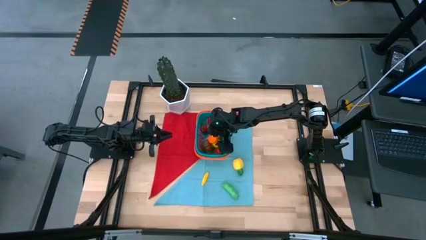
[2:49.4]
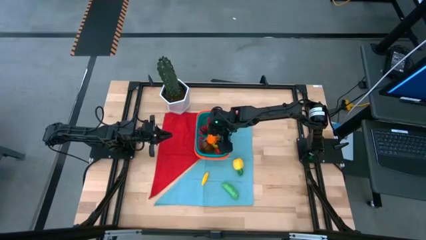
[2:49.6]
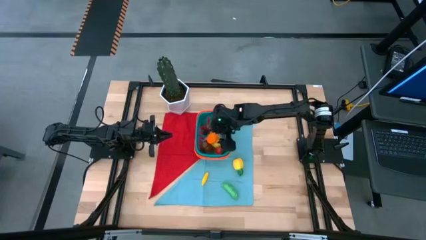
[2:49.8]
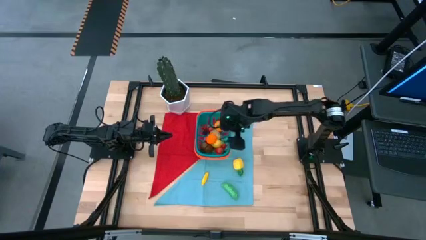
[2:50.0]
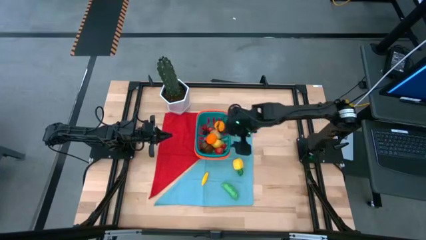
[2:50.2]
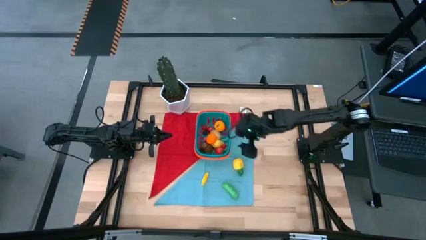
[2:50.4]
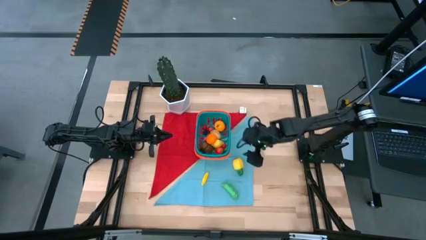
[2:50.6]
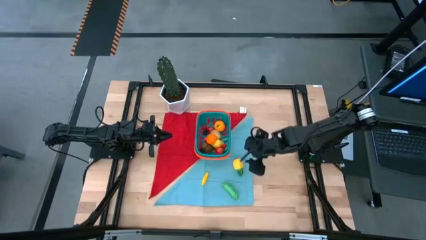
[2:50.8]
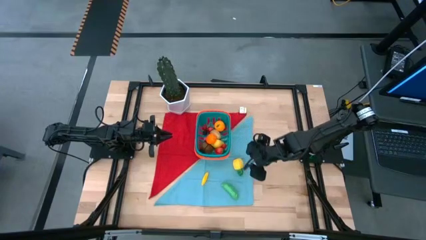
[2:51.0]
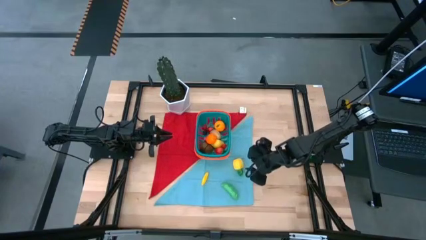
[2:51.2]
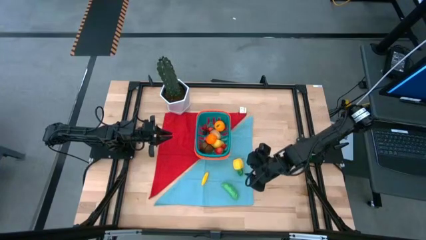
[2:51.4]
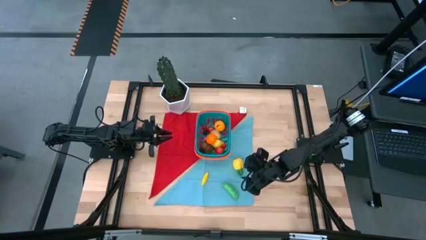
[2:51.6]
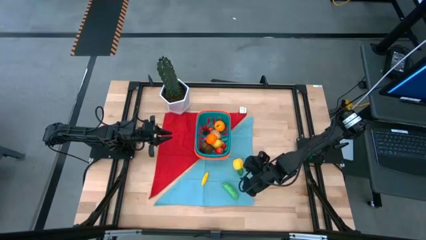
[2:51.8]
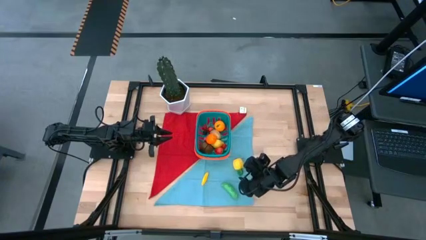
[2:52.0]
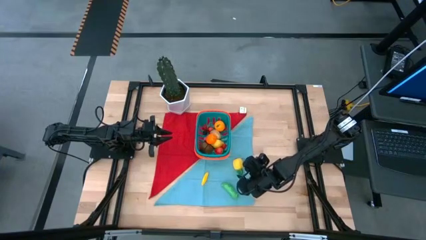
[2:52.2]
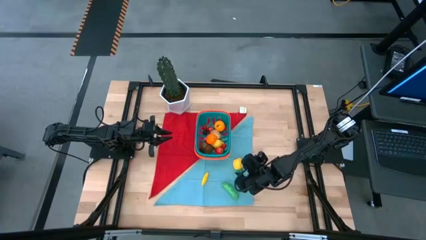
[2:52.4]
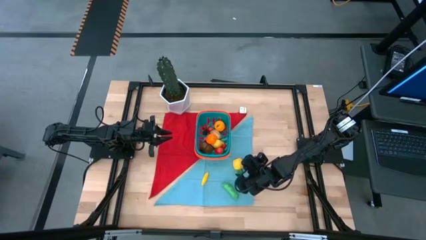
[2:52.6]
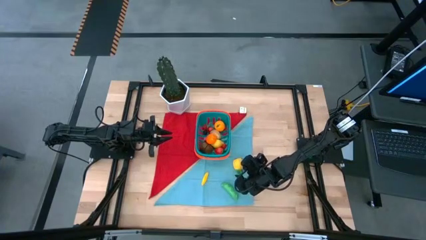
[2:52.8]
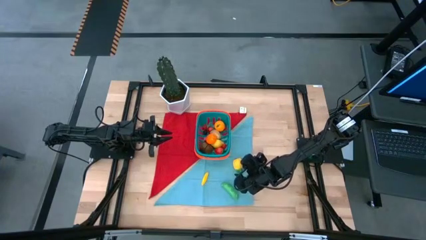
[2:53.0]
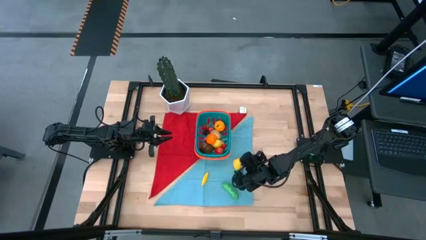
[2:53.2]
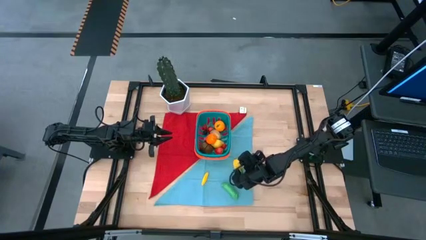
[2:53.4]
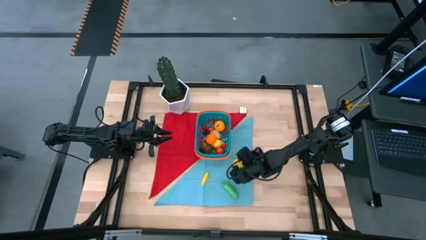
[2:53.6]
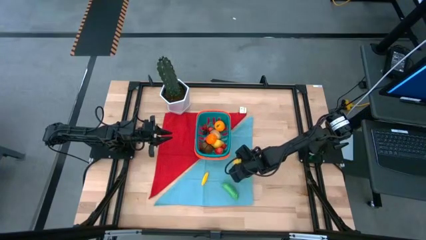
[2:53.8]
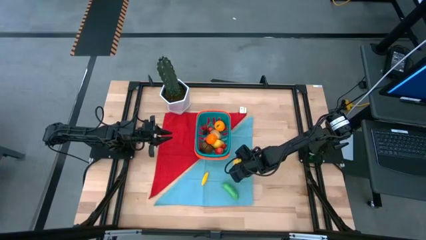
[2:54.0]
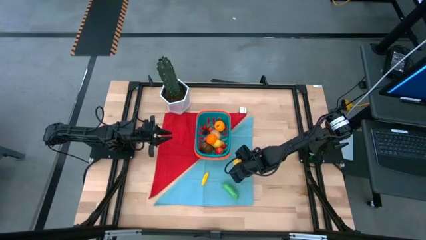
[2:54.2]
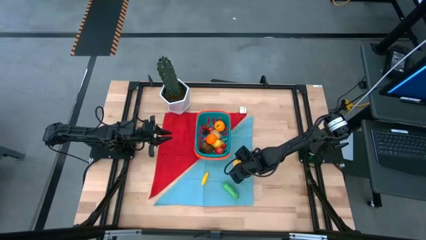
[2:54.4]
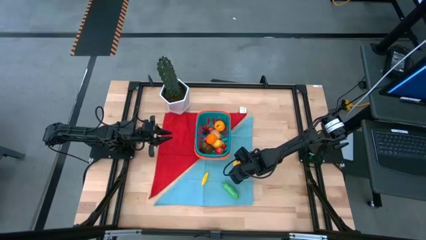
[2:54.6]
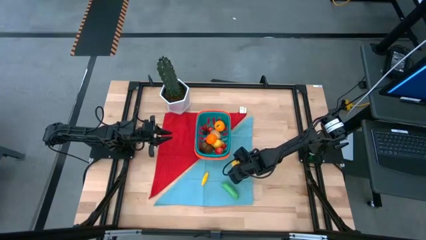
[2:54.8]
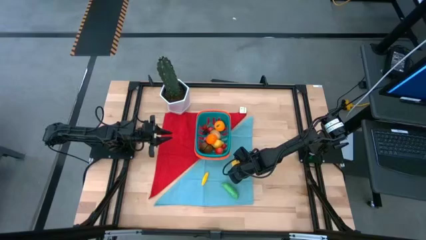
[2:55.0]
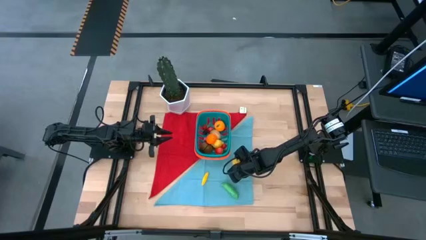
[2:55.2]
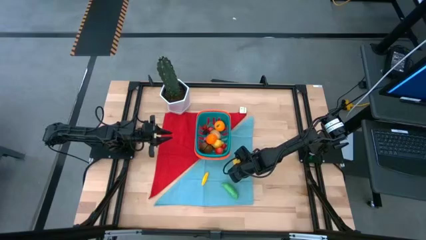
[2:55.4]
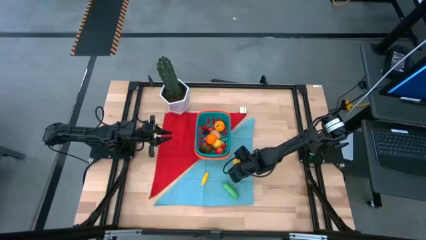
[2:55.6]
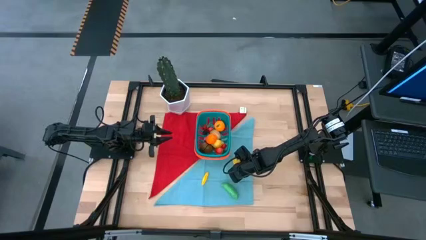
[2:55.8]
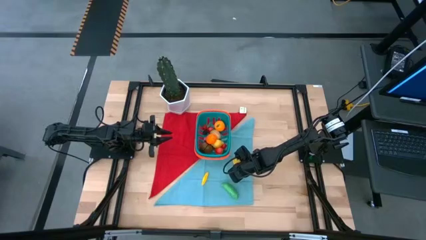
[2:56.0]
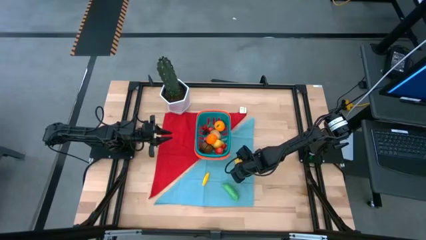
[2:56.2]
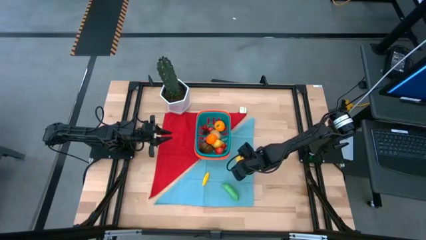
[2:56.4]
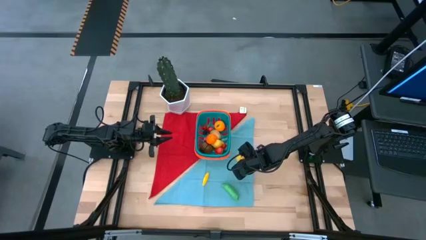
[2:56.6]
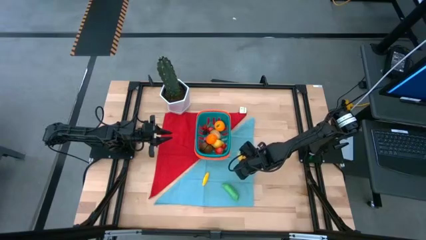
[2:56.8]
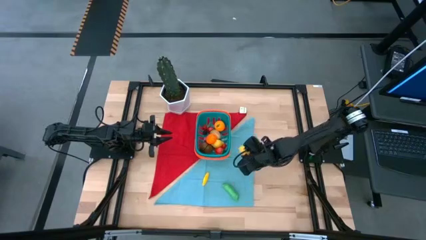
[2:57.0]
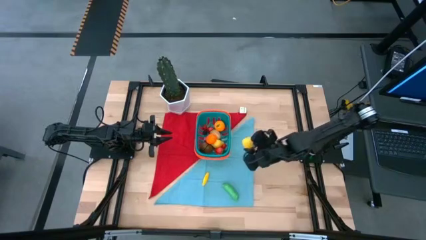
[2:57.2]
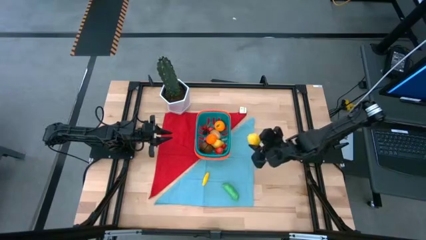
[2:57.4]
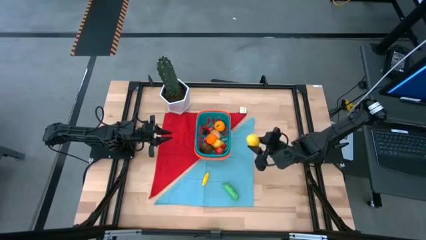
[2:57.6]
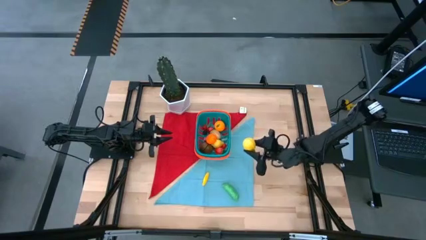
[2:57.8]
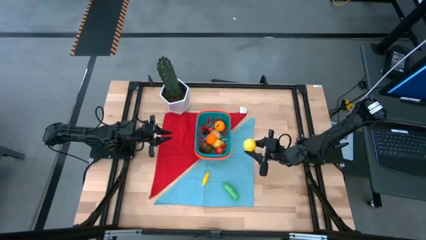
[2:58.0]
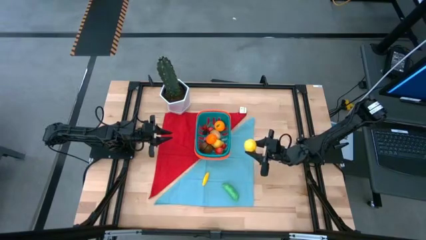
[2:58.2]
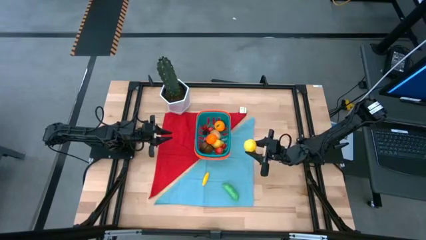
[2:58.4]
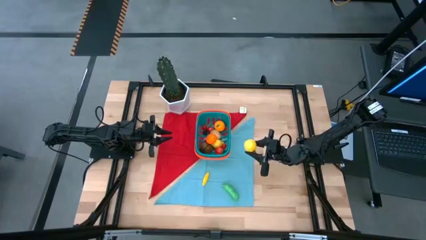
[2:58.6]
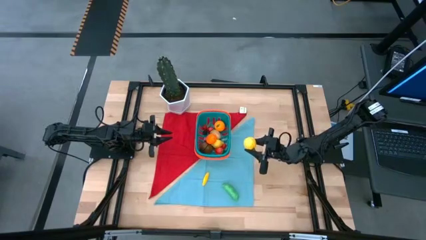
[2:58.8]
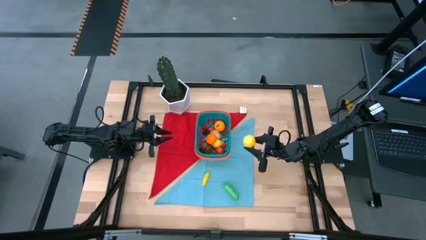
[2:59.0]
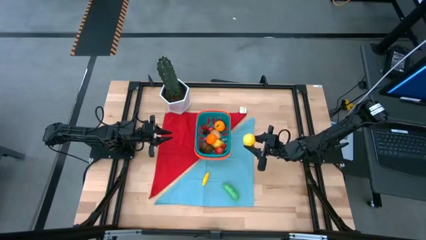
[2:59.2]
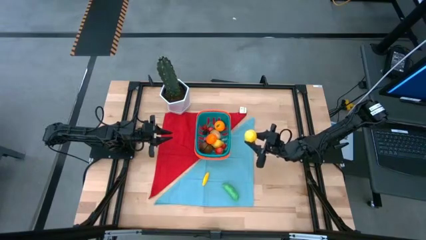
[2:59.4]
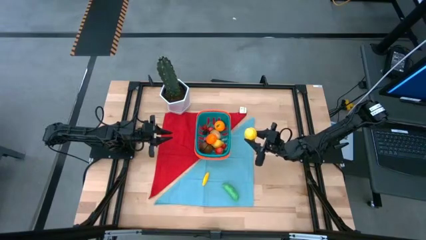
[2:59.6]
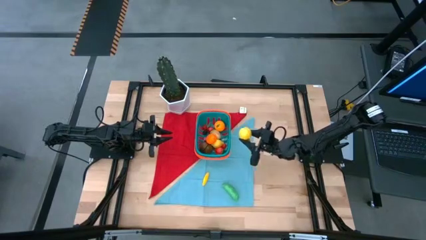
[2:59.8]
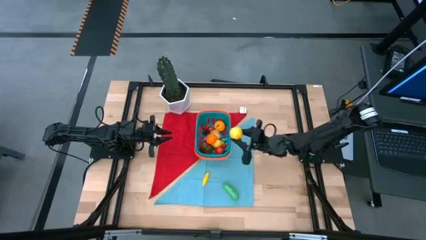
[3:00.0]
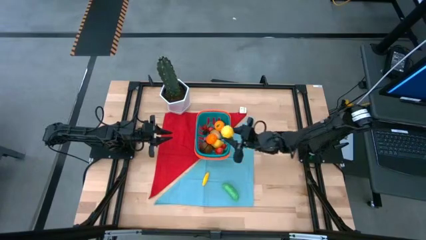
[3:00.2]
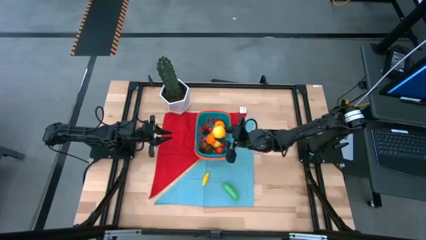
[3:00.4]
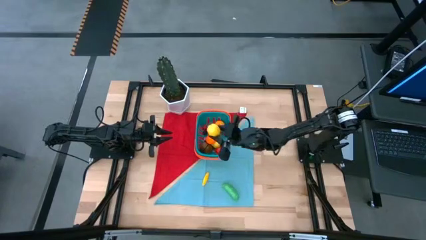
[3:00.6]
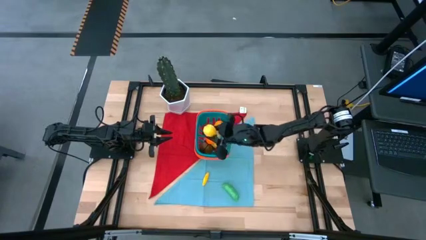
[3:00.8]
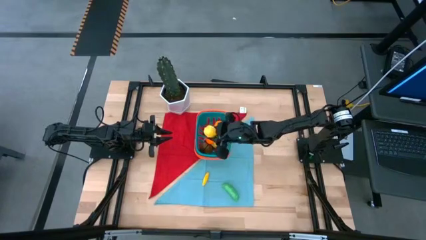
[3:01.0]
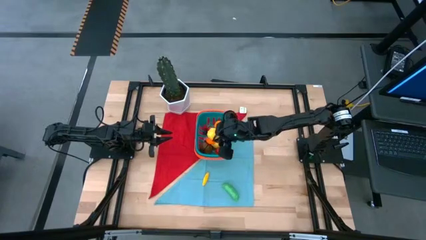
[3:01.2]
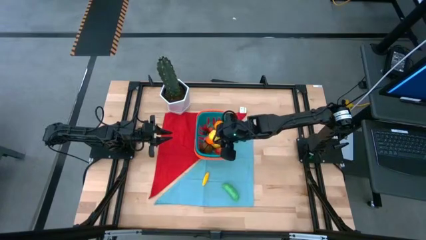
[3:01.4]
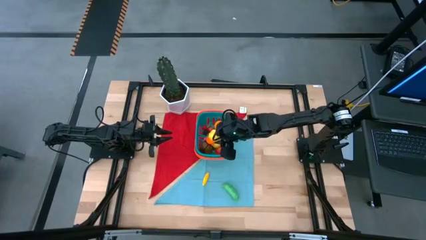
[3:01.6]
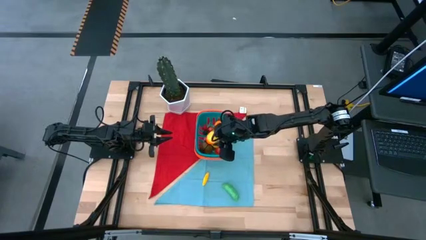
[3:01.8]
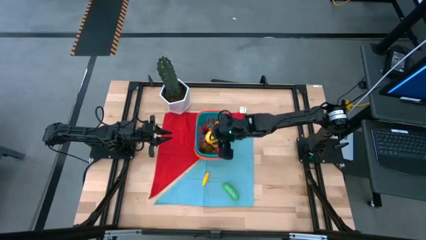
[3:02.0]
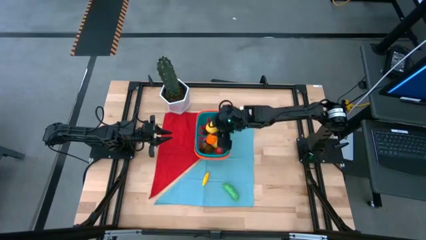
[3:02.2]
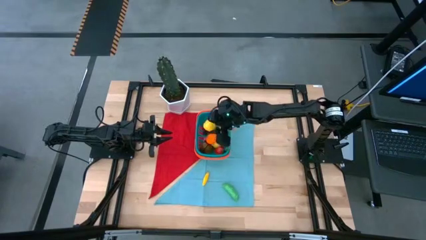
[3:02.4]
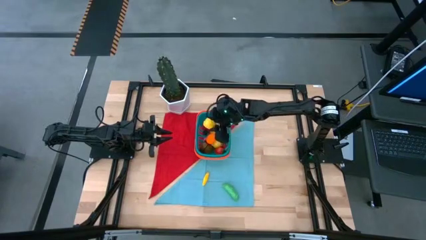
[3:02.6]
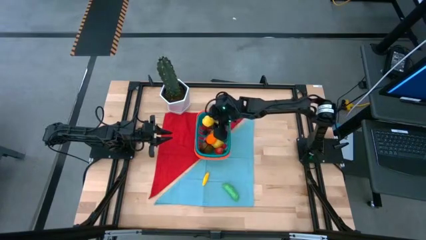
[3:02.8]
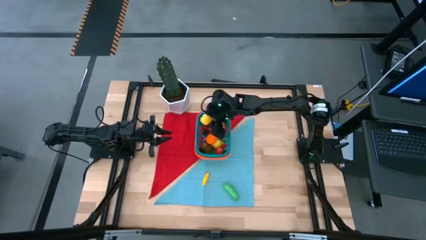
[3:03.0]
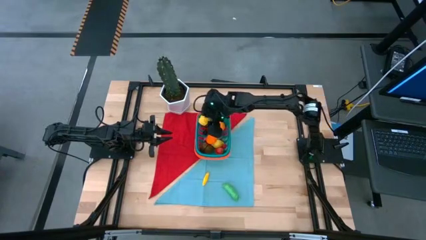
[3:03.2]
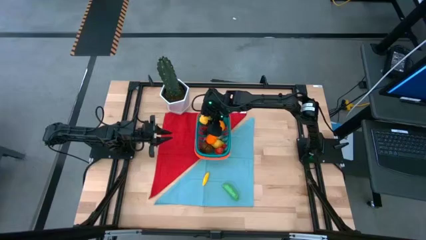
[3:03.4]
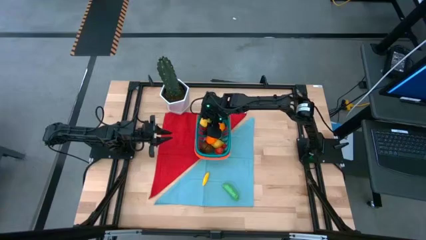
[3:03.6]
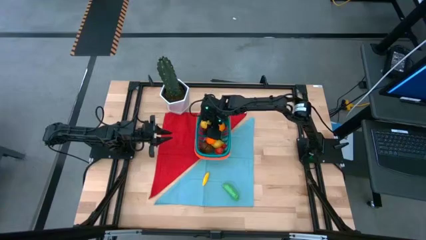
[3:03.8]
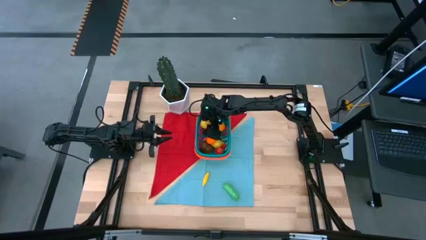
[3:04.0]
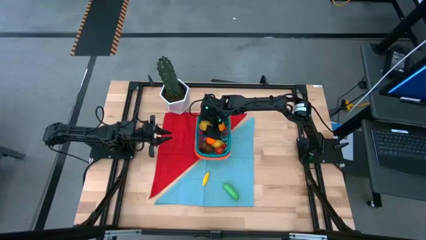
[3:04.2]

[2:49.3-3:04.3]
Task: Pick and placing Produce into tupperware
Put the pineapple into the basket

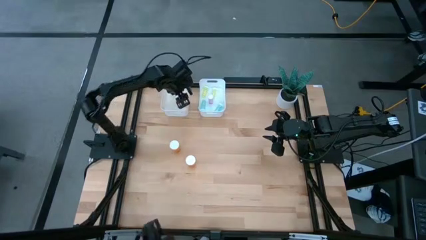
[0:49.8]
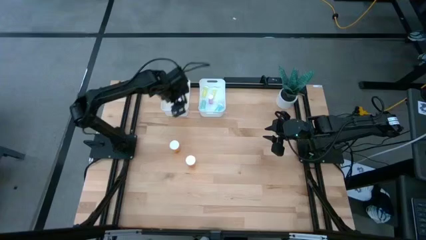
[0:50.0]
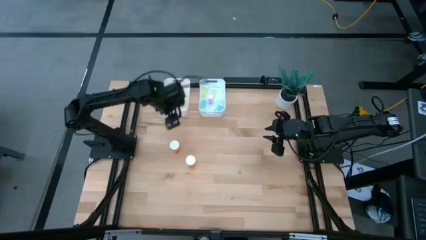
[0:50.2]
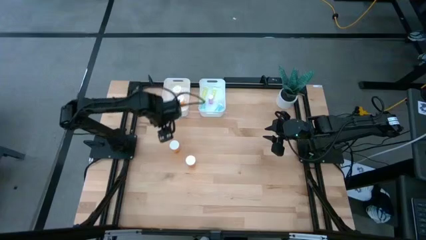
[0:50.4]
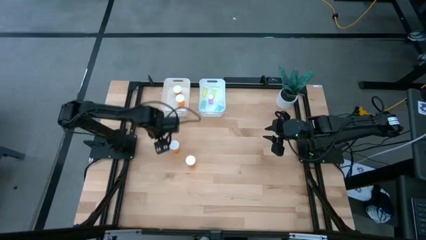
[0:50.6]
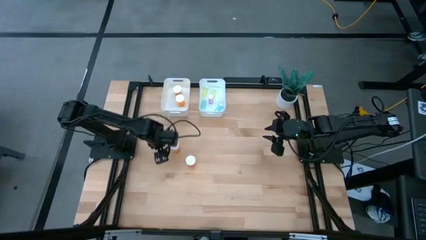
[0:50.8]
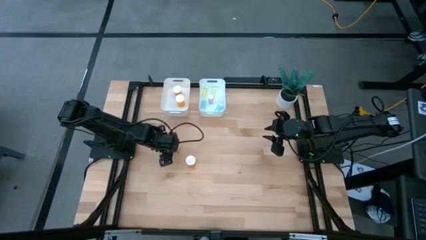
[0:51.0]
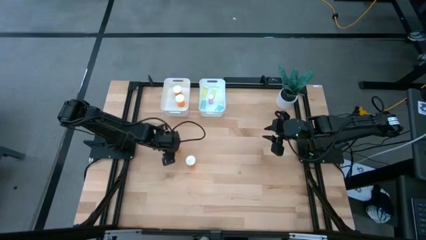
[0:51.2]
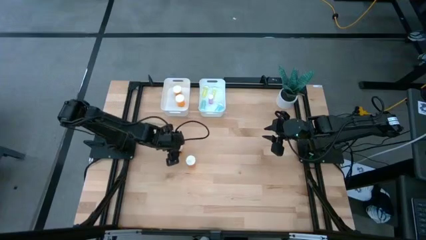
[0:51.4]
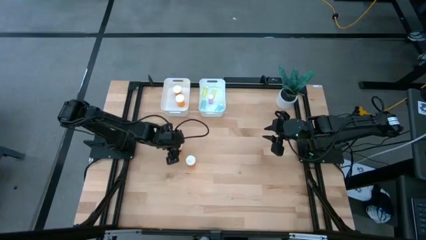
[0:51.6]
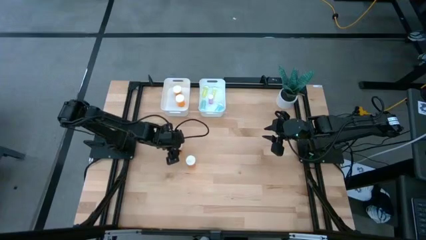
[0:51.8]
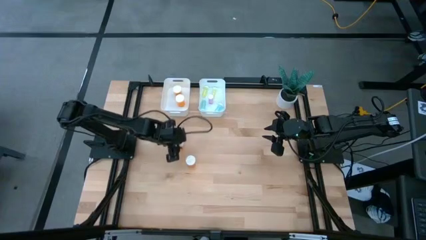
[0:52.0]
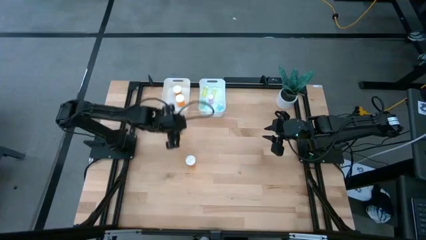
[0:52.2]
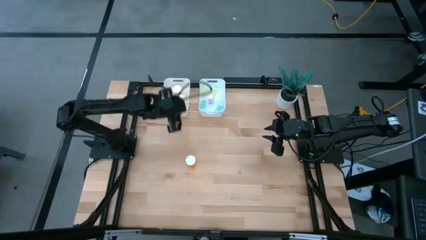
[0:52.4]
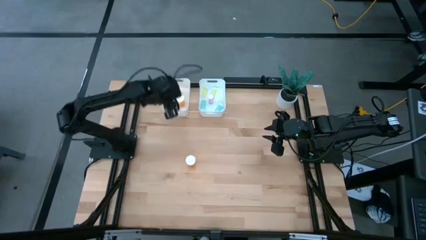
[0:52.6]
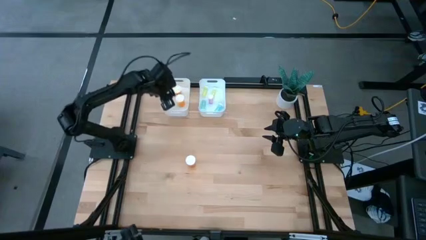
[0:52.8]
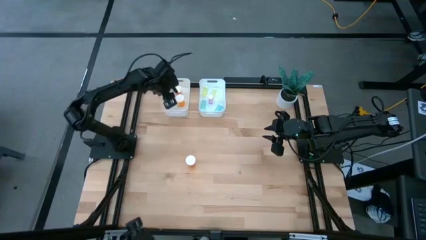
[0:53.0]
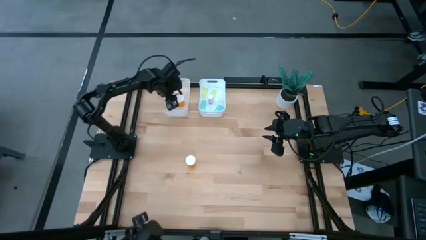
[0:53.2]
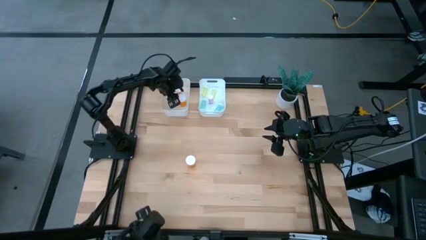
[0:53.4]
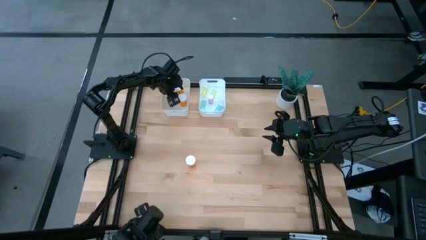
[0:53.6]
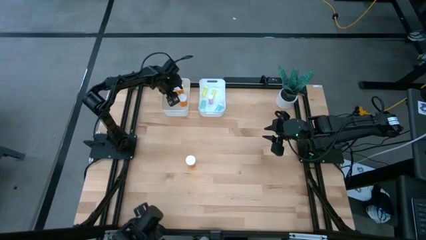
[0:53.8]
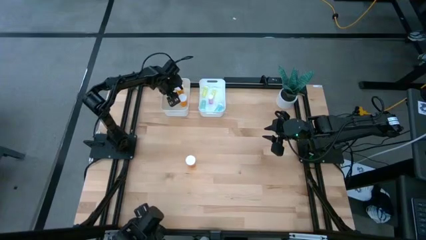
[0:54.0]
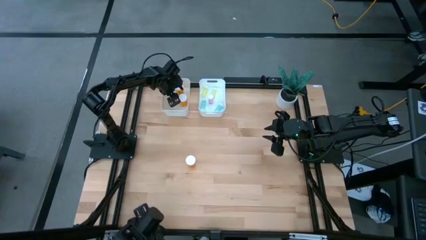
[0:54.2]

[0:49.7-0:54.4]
Task: Pick and place medicine bottles into bin by pill shape (circle, oval)
Put the large orange pill bottle into the left white bin
